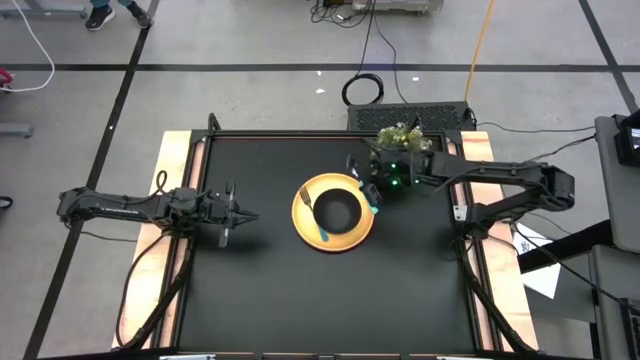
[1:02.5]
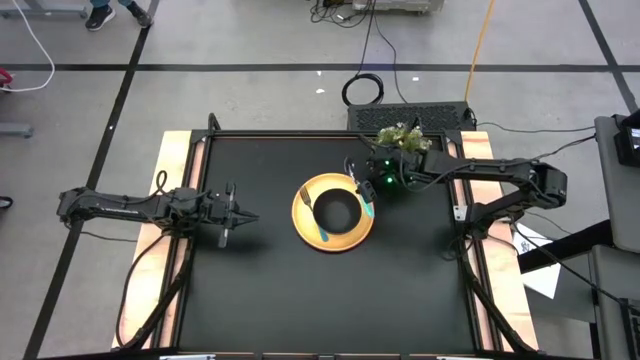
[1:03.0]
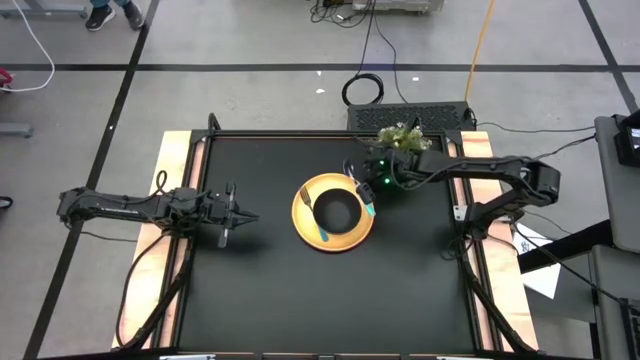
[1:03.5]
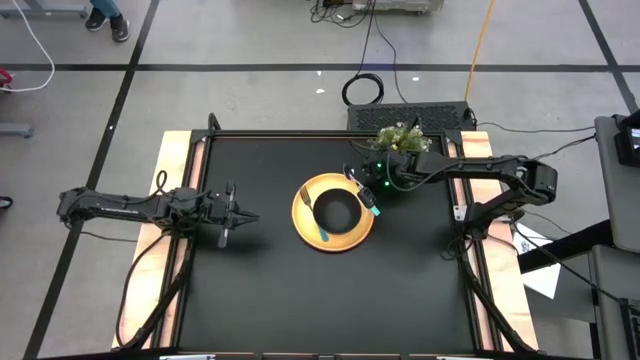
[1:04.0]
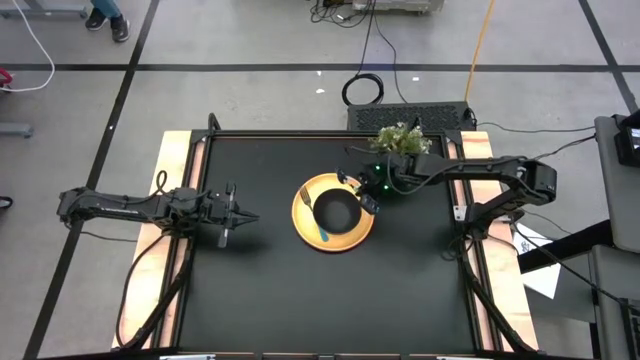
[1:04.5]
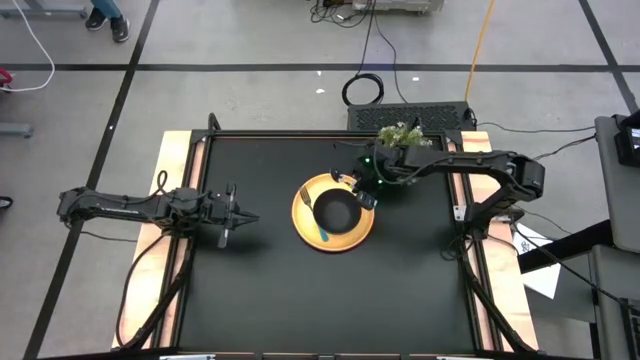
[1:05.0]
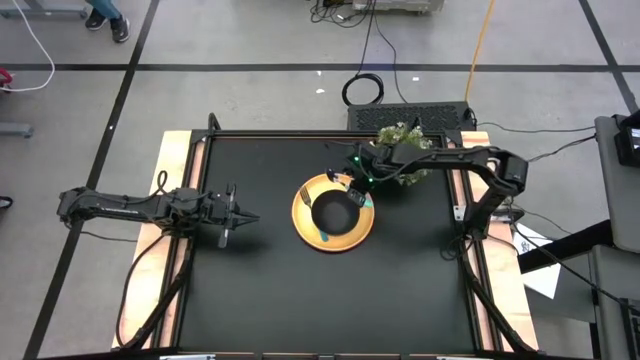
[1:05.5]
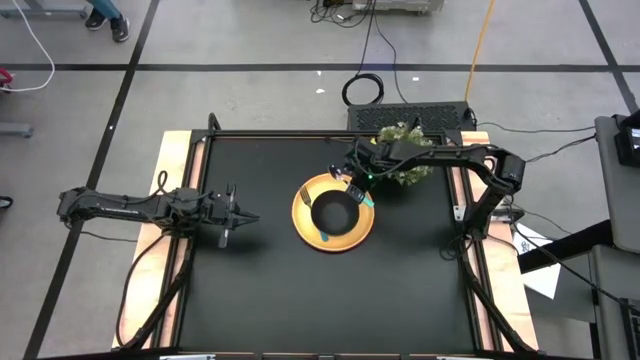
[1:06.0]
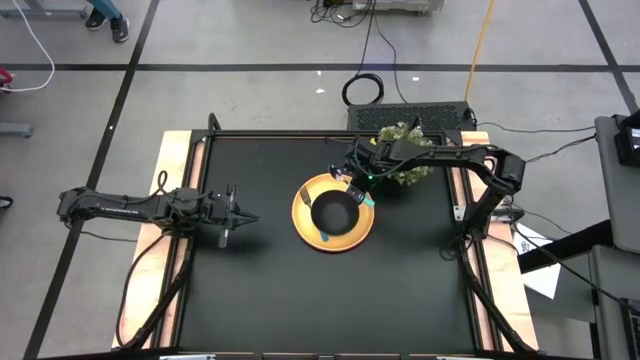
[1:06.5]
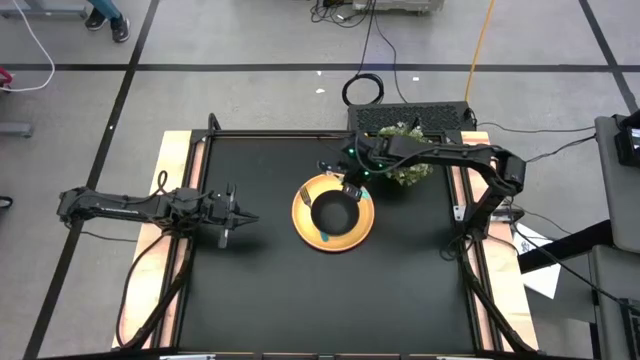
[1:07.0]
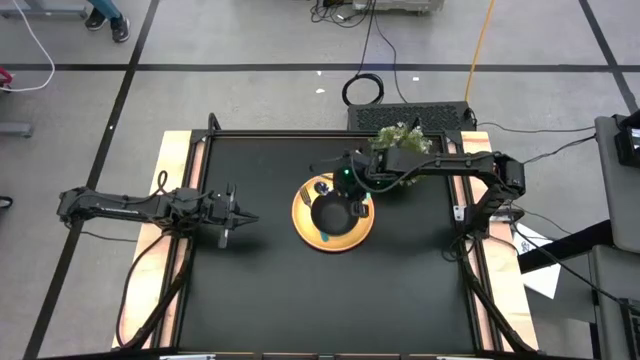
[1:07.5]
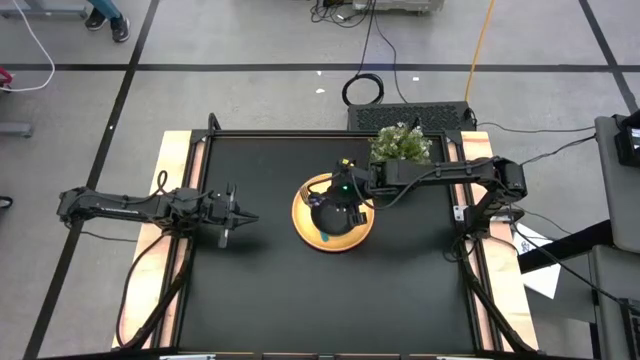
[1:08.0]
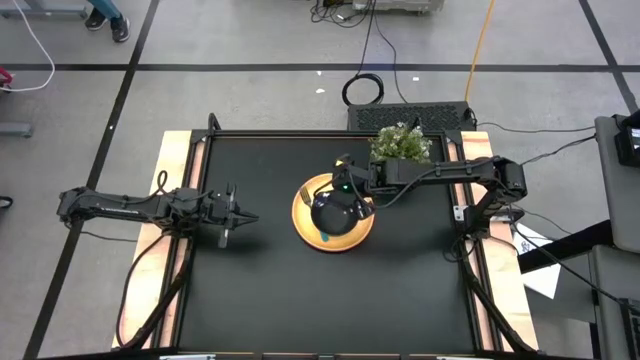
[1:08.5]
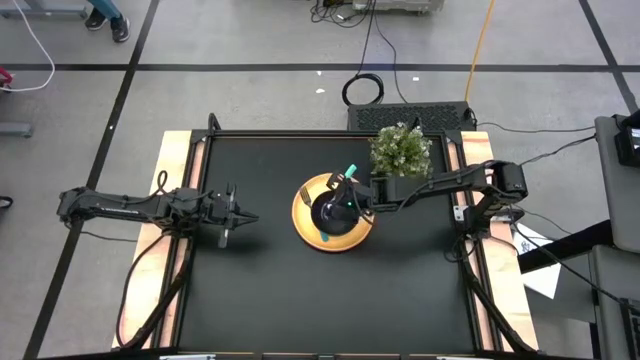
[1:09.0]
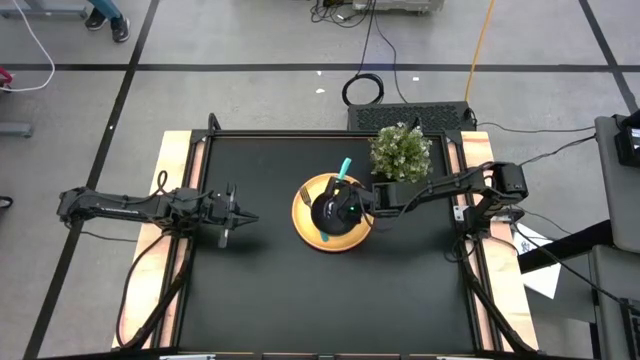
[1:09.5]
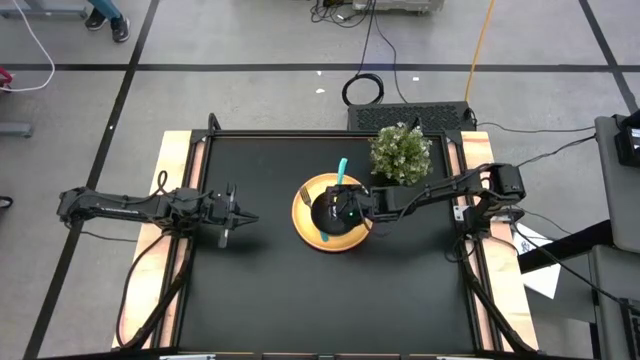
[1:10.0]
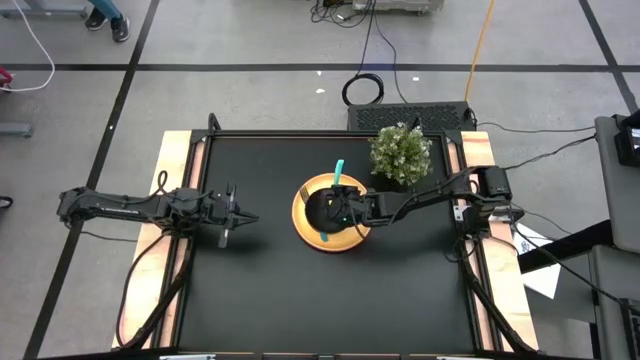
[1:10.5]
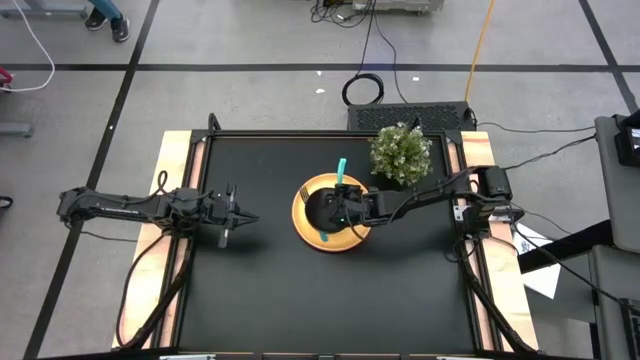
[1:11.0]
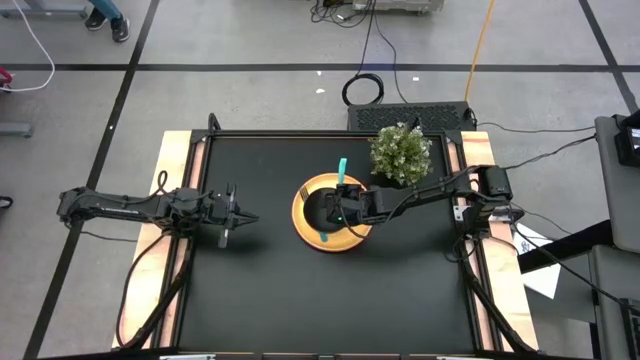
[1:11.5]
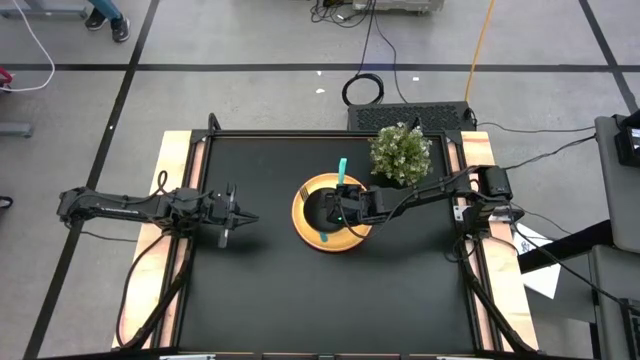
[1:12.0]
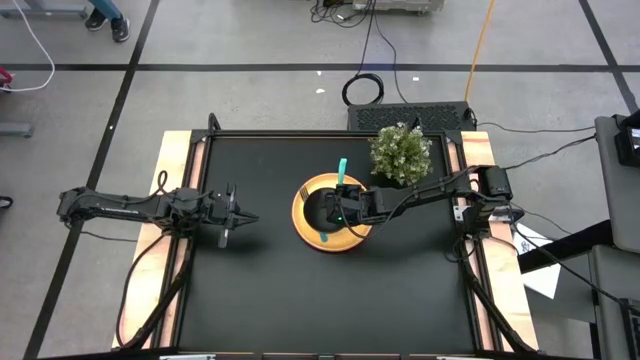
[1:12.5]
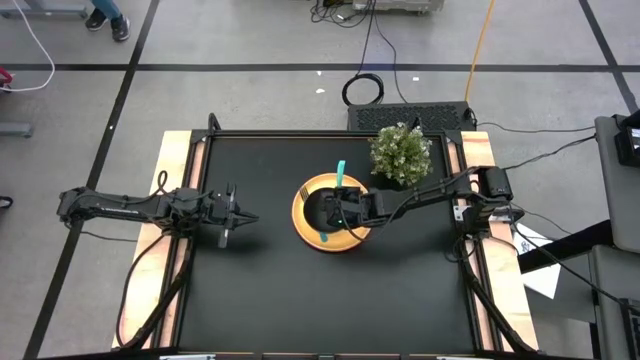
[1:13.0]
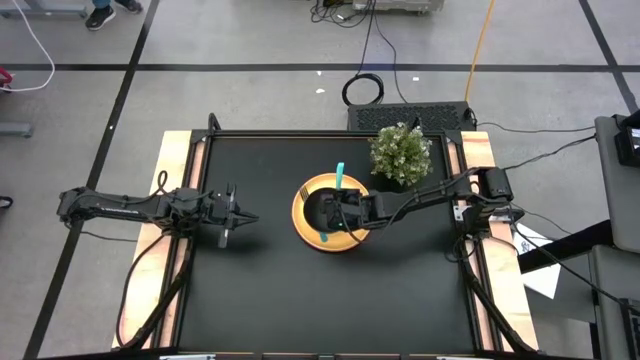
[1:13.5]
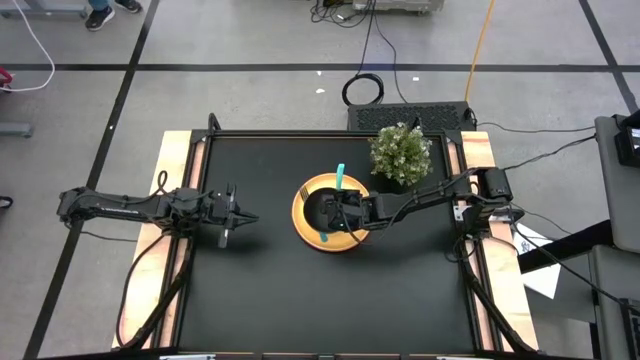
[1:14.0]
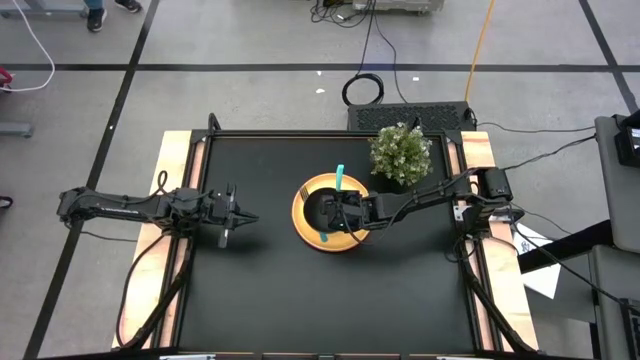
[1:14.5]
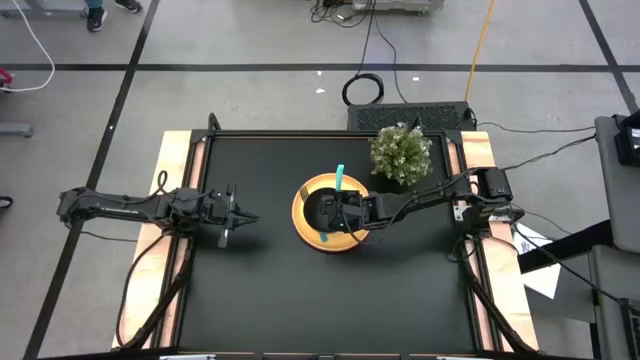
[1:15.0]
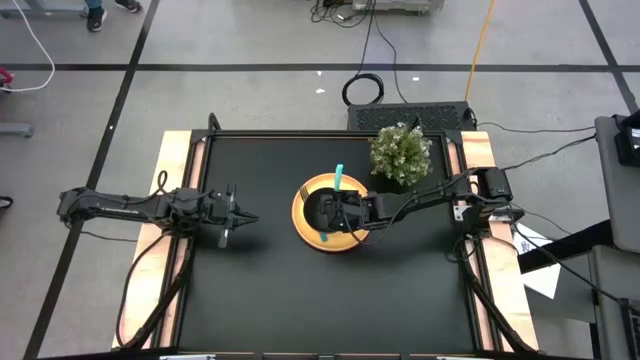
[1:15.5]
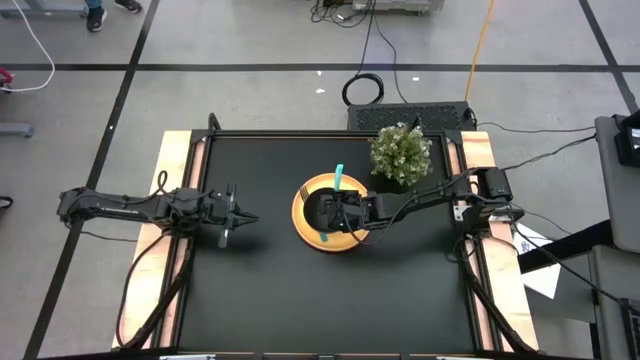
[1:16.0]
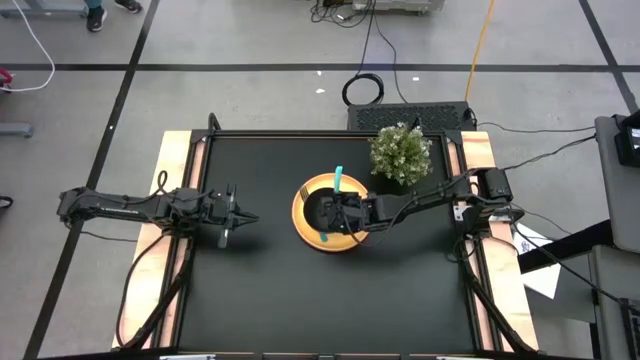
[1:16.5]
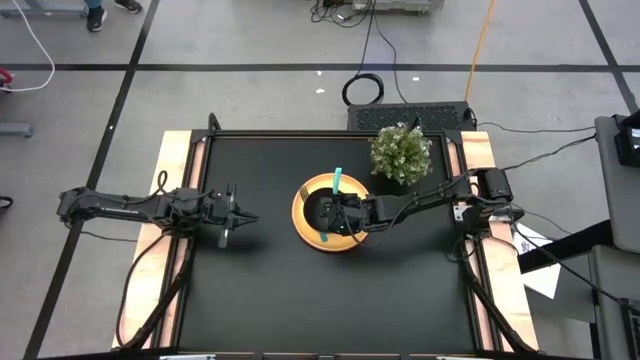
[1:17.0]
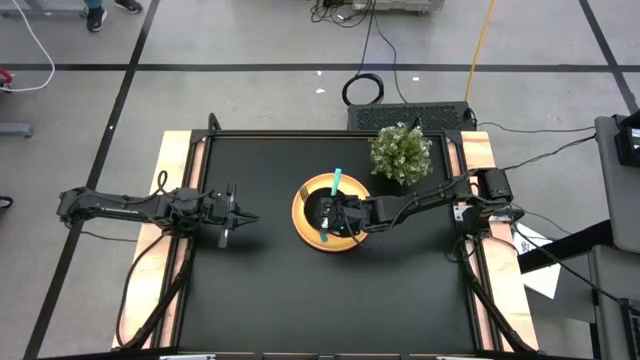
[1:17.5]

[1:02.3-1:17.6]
Task: Set table place
Put the blue spoon into the black bowl

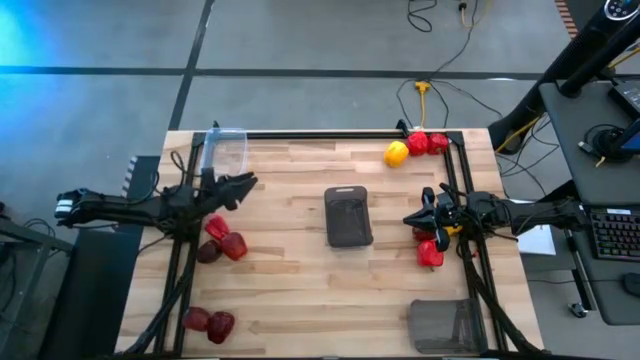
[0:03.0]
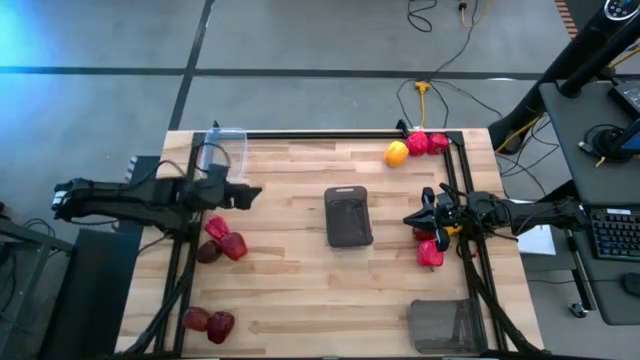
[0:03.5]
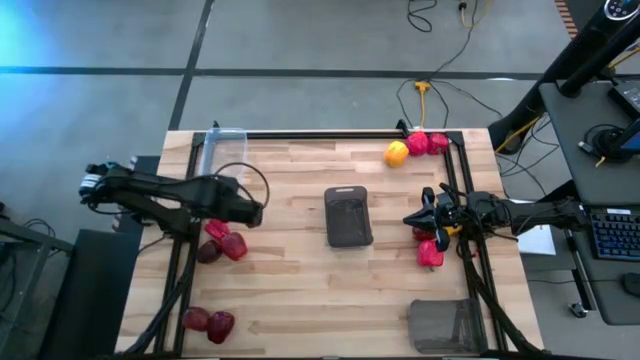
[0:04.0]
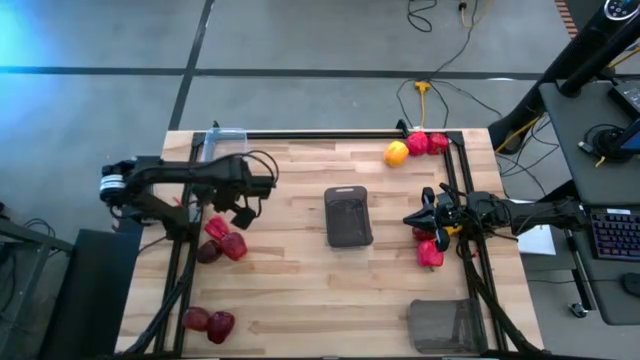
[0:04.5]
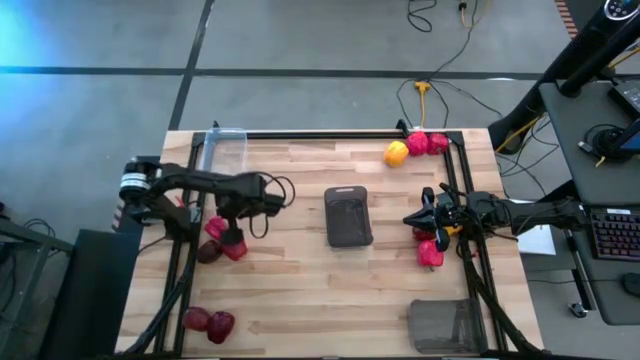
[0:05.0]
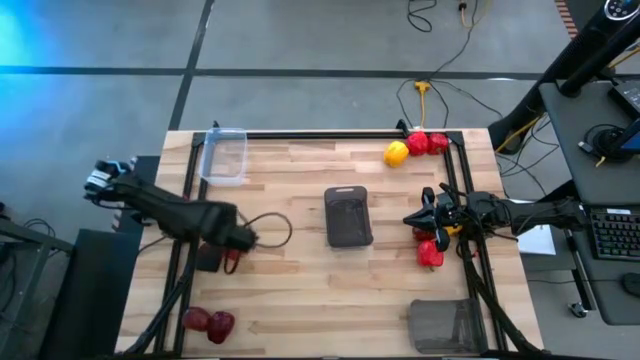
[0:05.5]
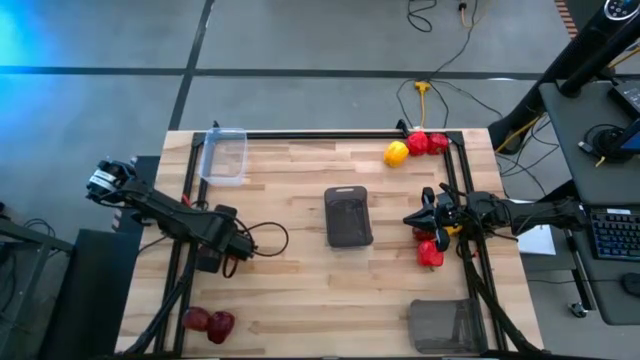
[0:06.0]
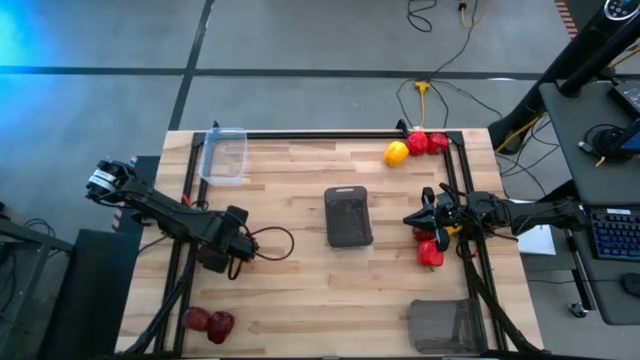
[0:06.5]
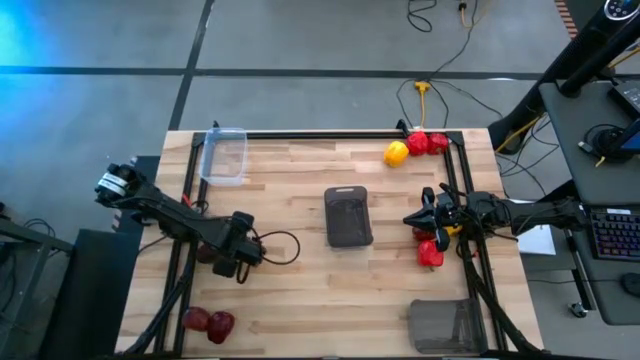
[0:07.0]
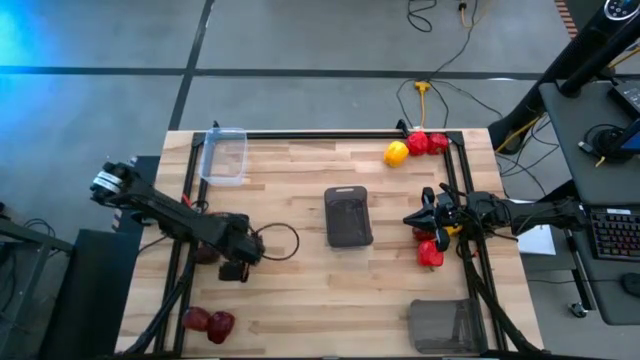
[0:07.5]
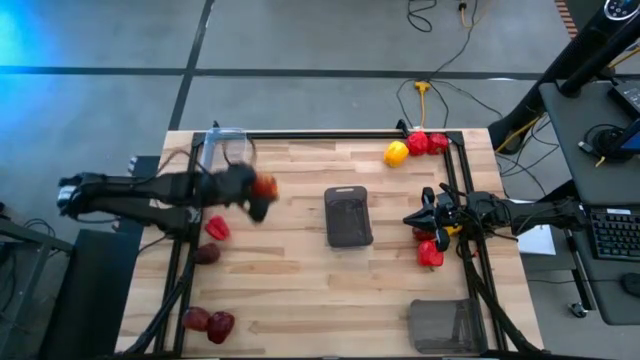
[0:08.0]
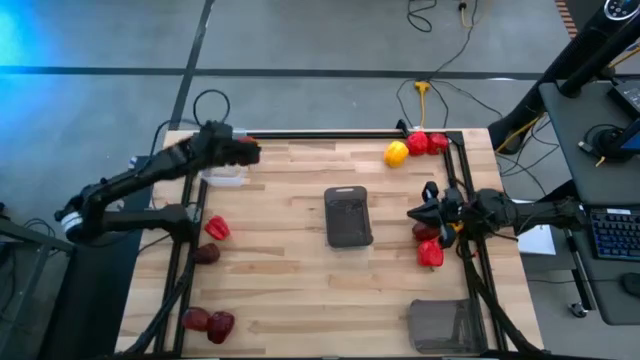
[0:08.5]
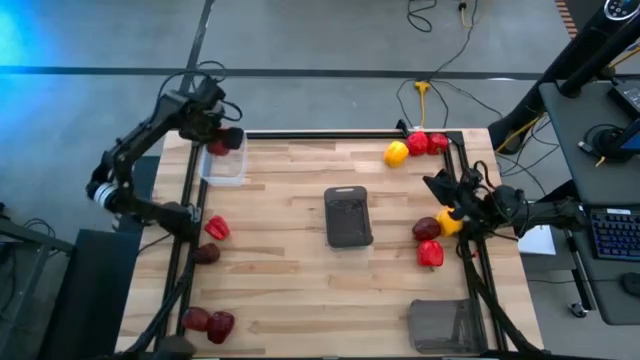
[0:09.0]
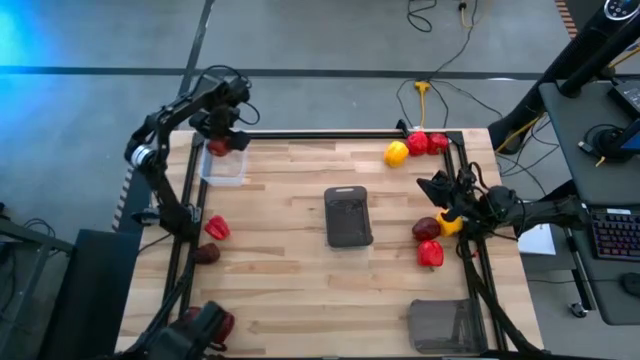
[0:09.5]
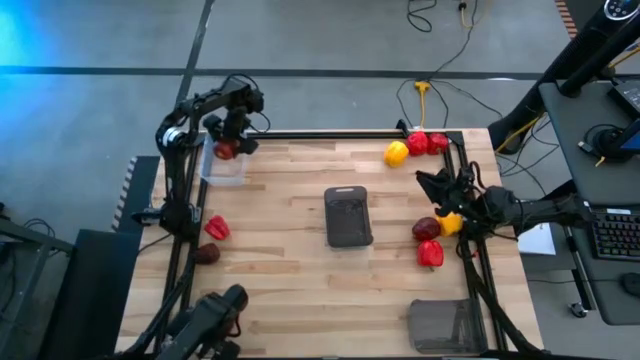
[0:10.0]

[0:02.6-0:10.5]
Task: Sort produce into baskets
Put the red apple into the transparent bin
